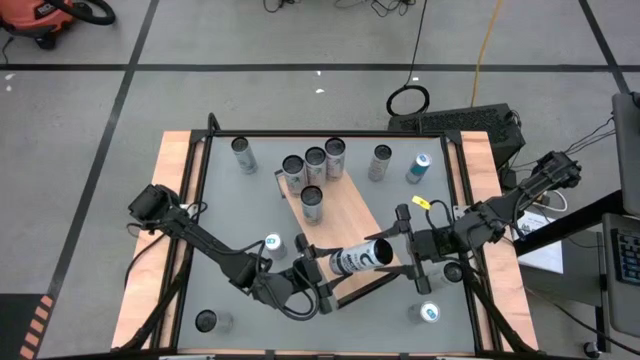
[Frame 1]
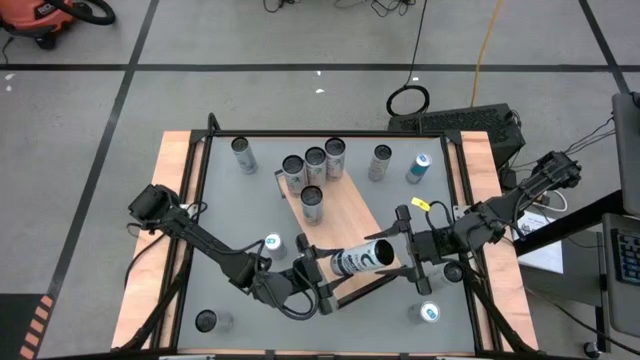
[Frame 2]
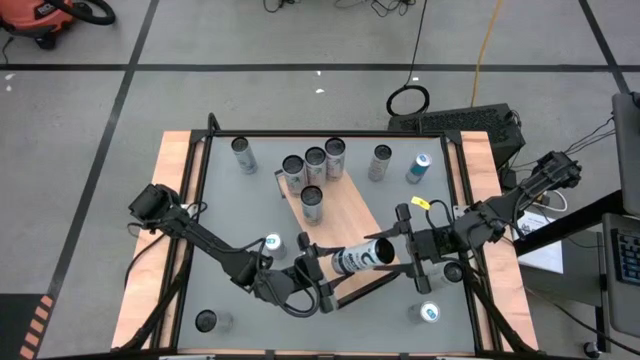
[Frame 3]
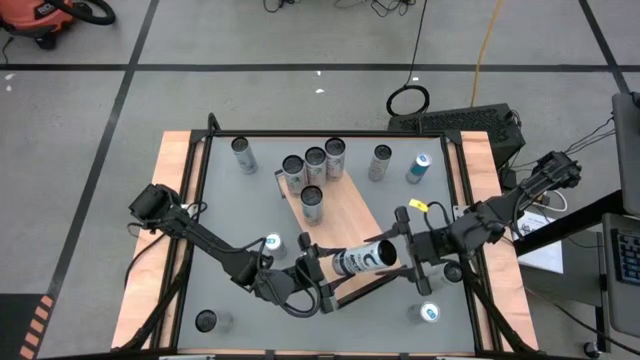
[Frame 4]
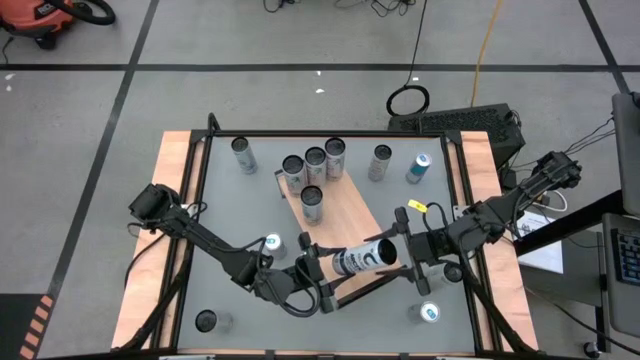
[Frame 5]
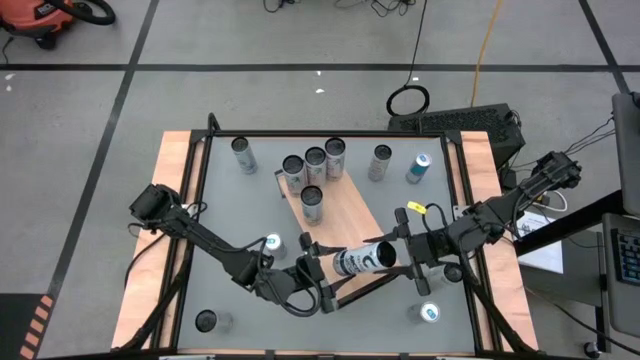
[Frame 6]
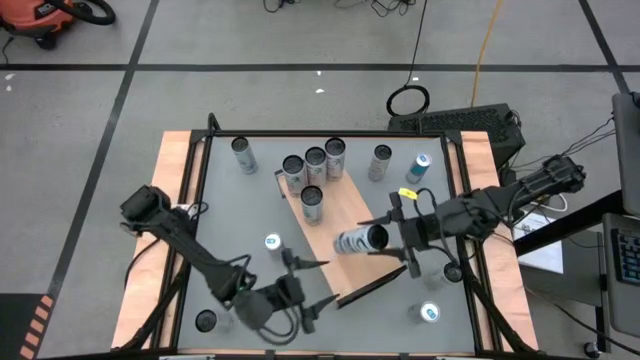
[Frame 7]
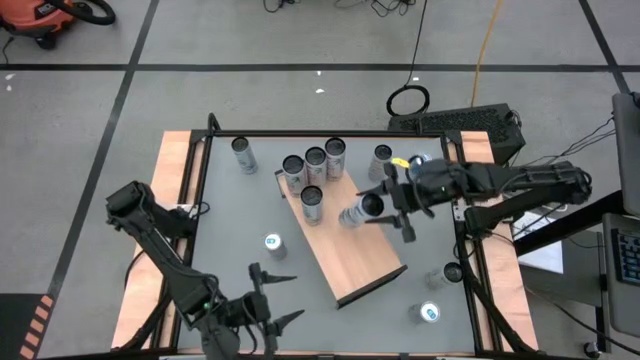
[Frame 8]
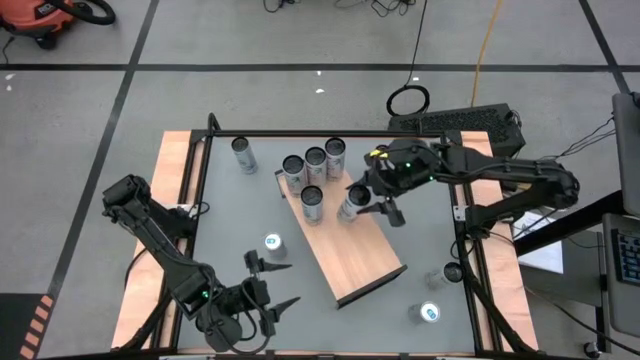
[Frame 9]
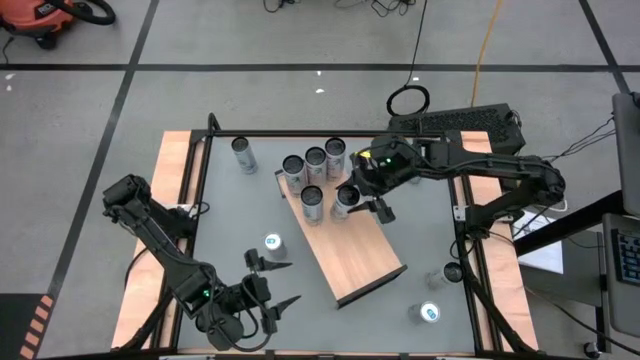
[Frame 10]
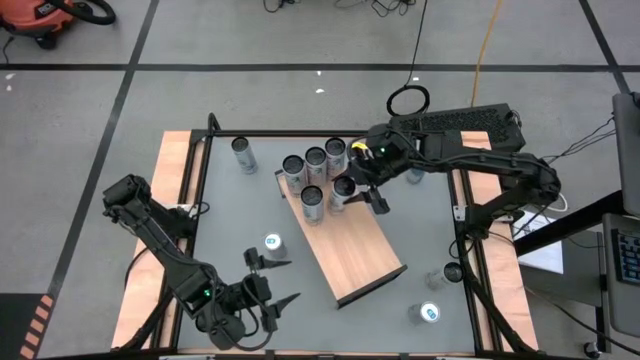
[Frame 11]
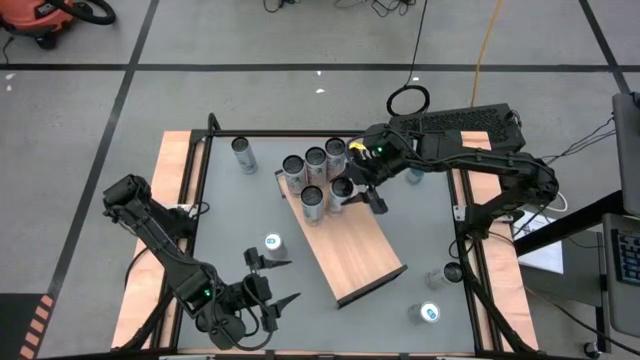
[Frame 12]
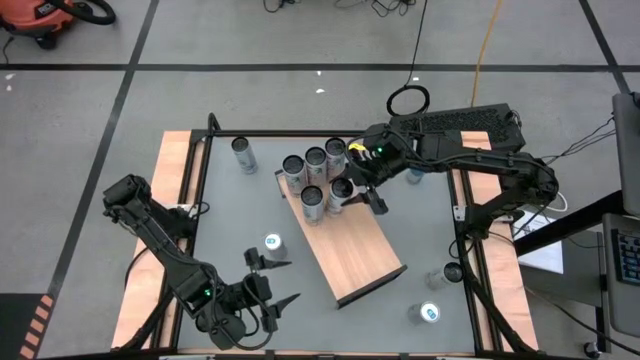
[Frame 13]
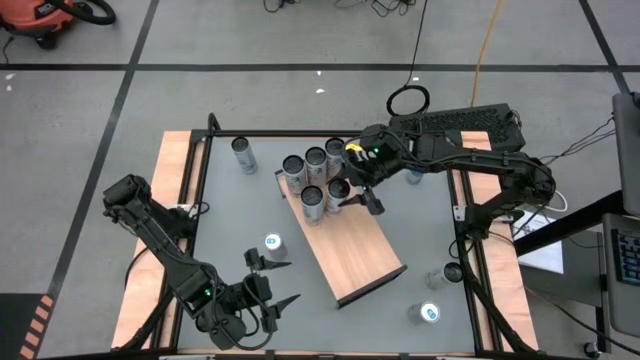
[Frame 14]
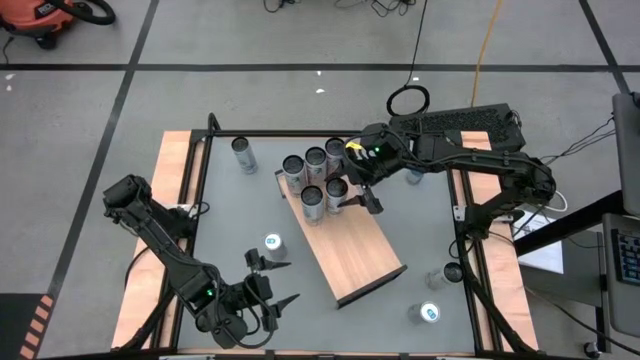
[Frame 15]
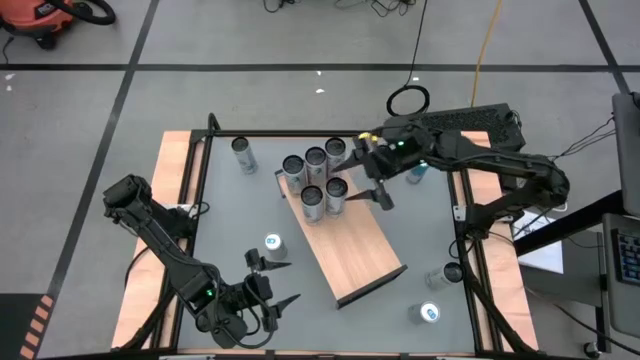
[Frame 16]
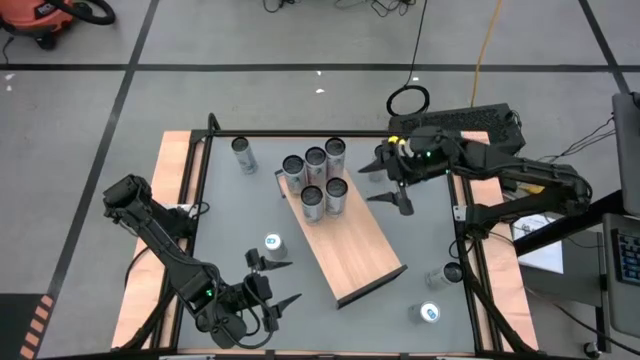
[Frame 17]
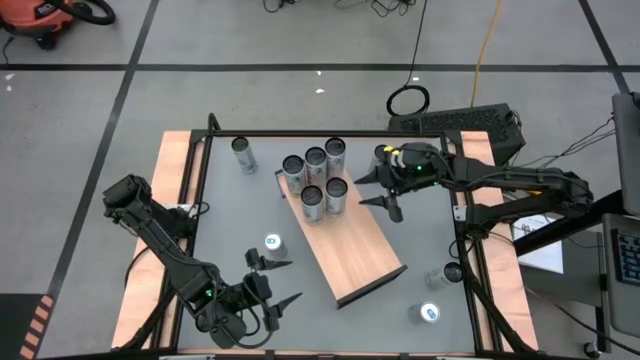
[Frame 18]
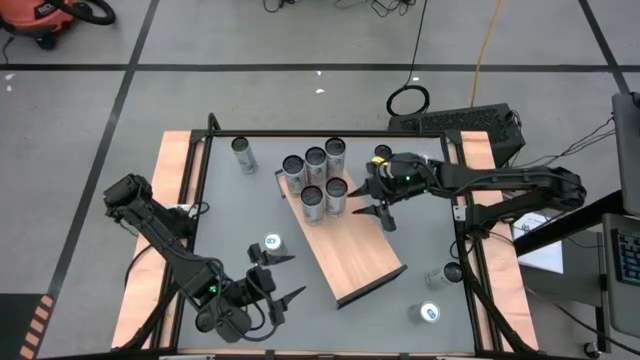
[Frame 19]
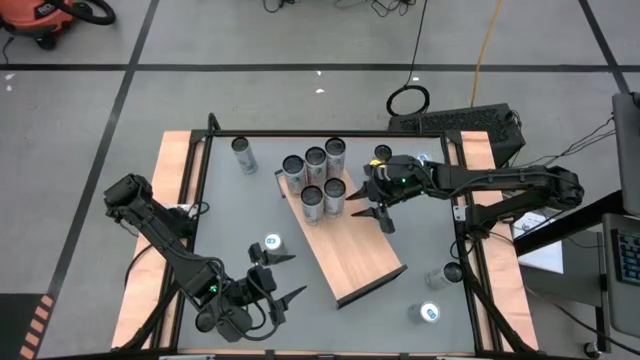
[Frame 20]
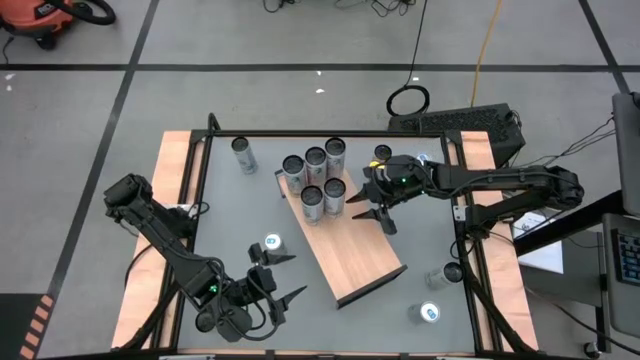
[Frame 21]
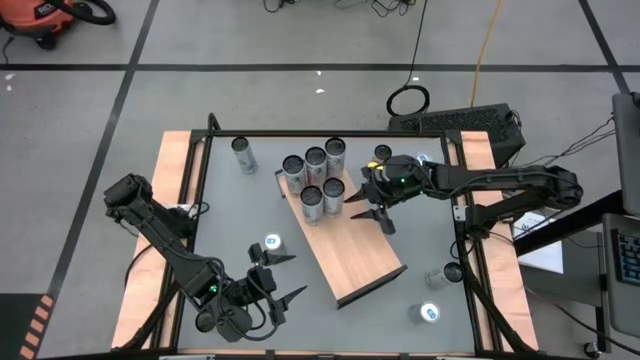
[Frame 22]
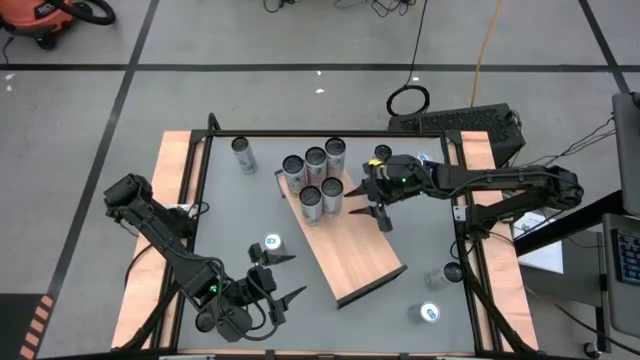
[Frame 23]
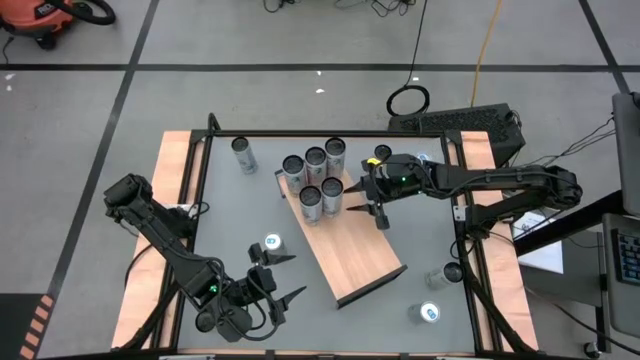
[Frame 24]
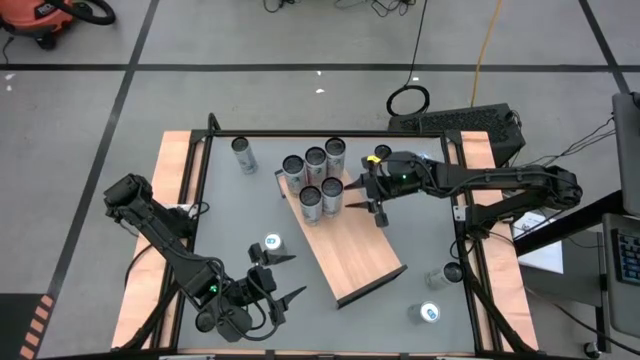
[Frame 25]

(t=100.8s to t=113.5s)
Task: Place canned beverage on shelf
Put the right white-blue soda can on the shelf aligned with the other white-blue soda can
